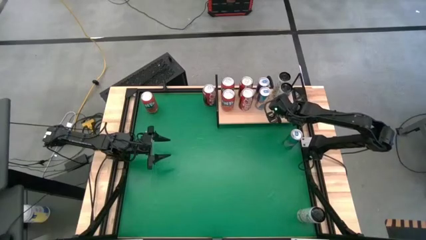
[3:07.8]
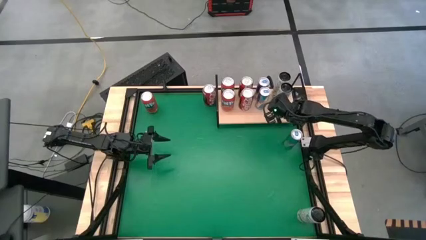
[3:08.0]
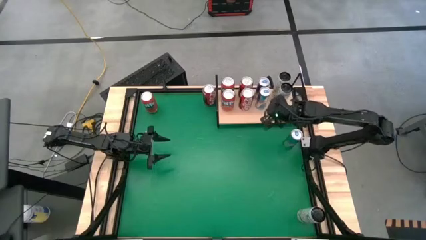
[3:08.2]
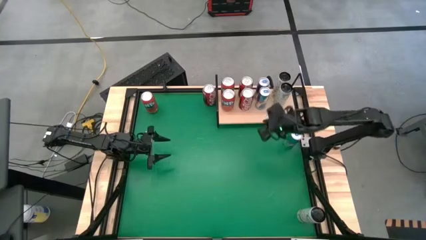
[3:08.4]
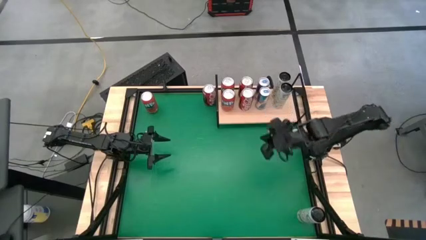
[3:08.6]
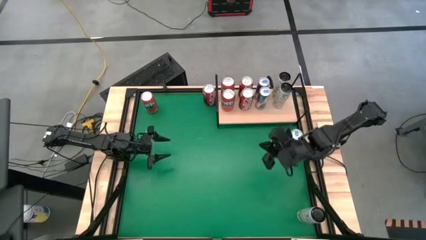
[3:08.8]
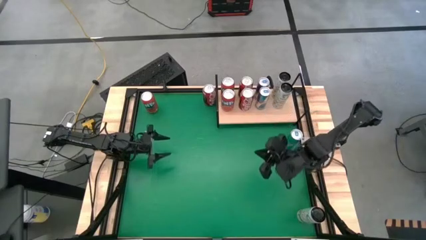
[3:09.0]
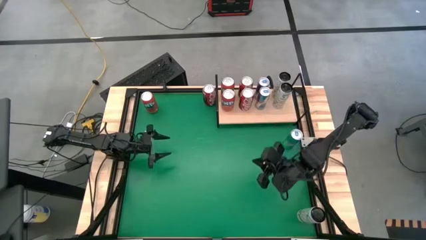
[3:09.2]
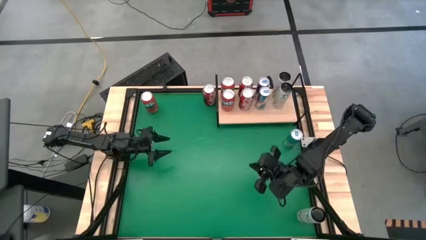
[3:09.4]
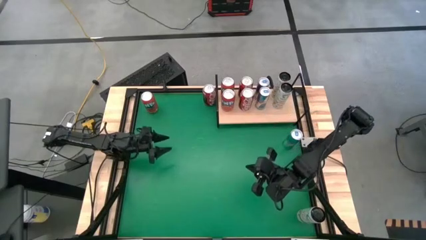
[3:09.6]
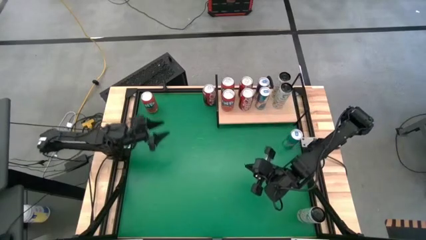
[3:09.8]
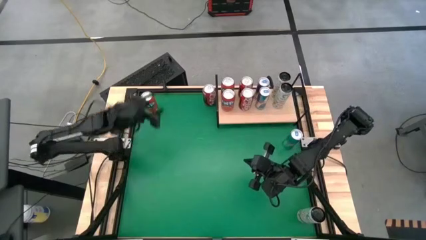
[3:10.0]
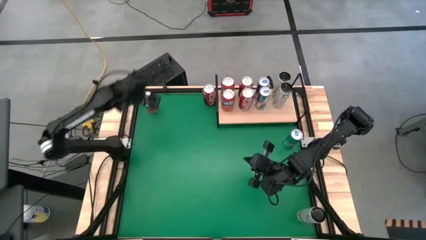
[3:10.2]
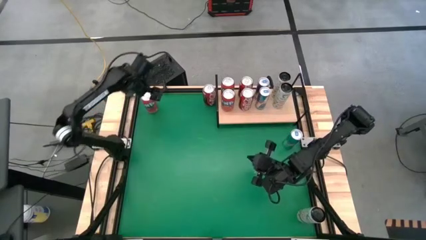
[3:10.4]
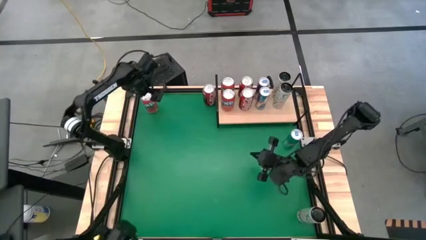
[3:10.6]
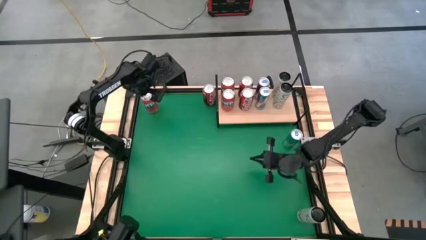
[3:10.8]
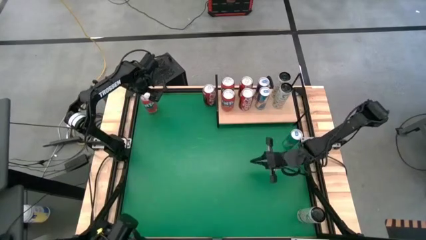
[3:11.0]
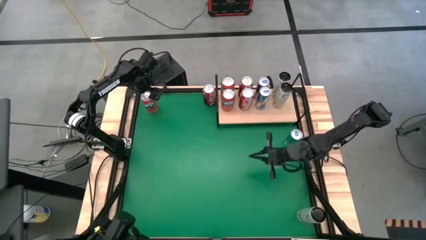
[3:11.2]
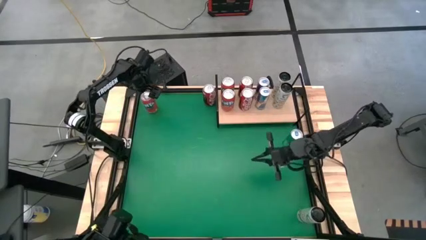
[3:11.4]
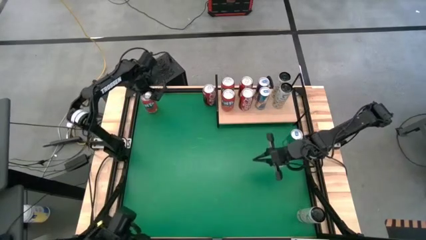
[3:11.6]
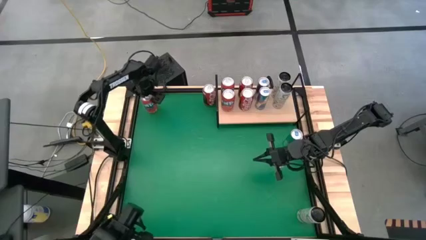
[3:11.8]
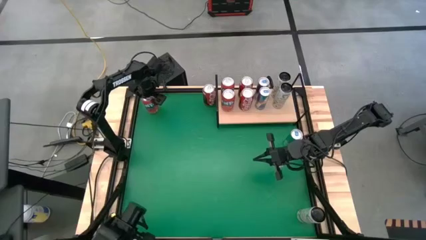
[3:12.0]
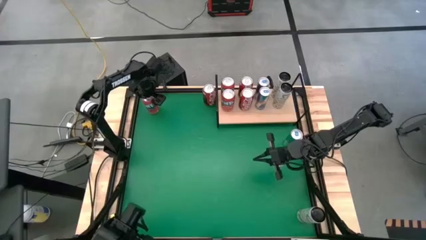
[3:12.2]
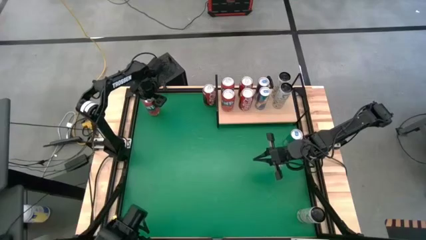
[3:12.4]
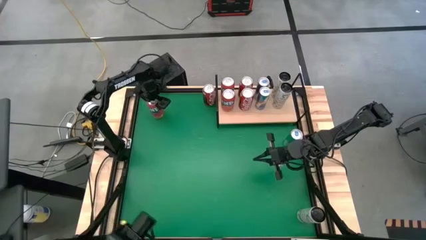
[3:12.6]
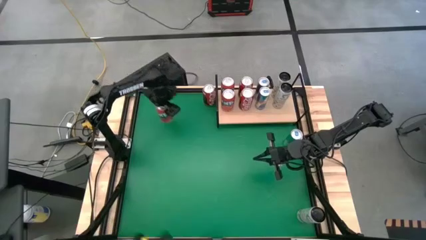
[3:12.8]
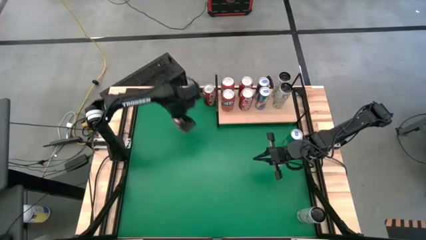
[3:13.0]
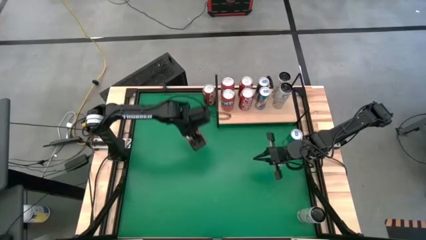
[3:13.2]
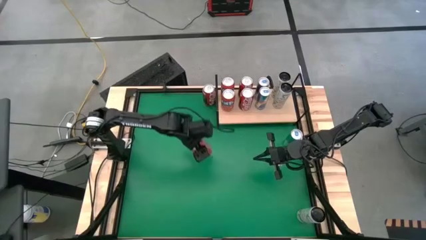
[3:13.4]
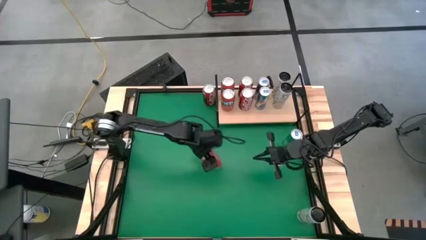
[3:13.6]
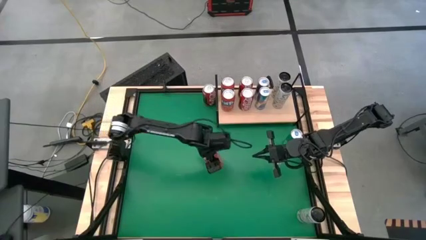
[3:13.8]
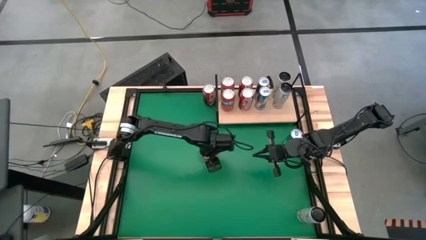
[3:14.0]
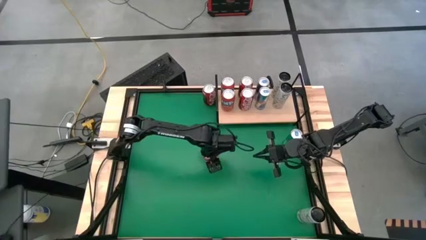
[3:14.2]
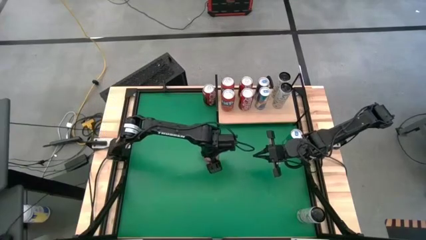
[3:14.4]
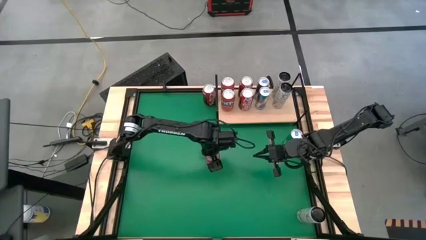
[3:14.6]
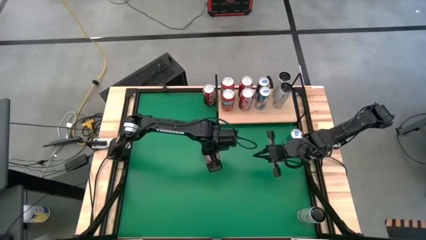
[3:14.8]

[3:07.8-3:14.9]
Task: Place canned beverage on shelf
Move the red soda can to the center of the table

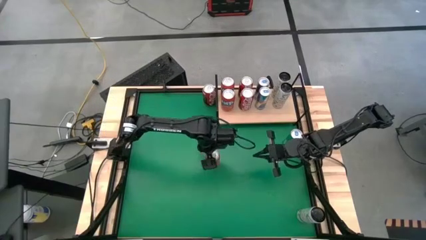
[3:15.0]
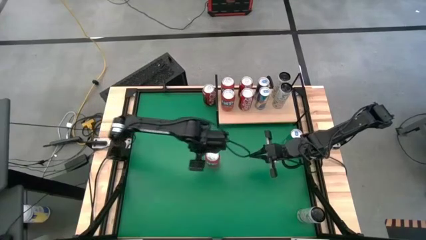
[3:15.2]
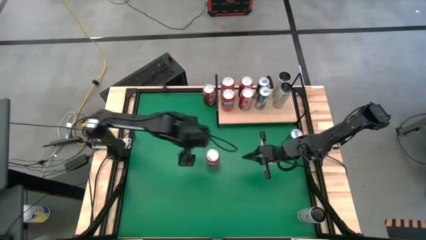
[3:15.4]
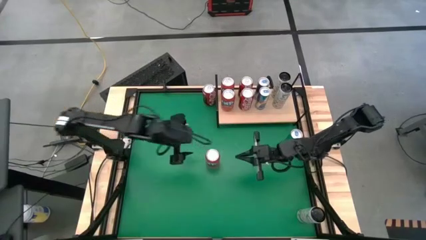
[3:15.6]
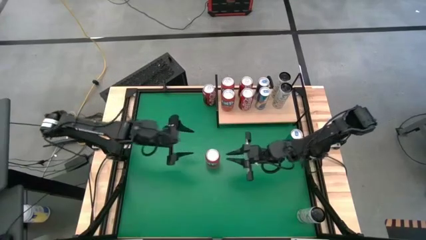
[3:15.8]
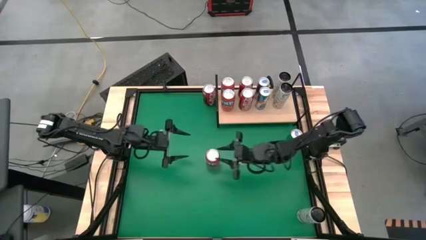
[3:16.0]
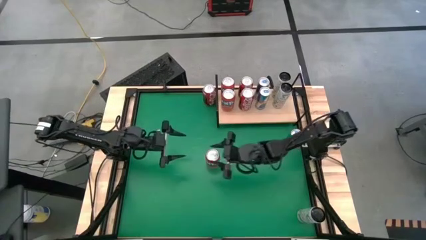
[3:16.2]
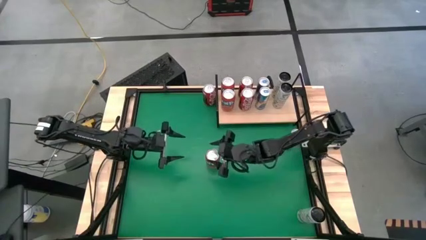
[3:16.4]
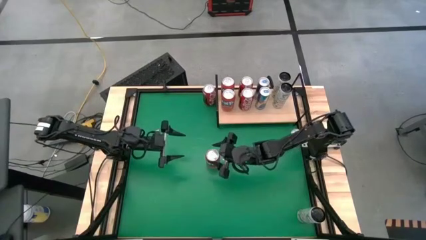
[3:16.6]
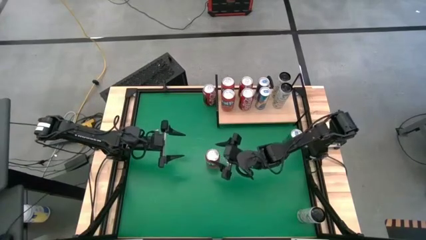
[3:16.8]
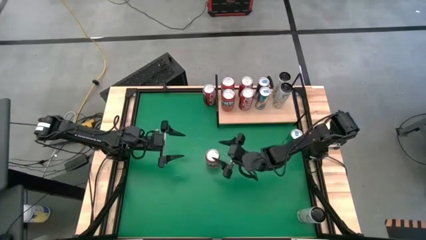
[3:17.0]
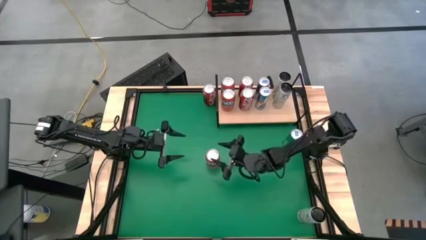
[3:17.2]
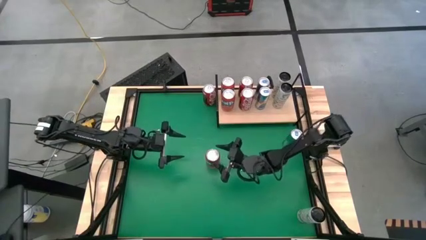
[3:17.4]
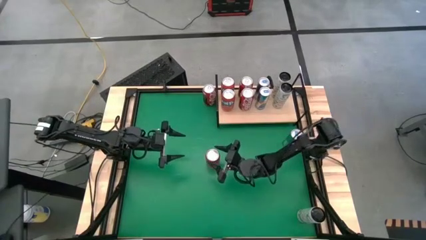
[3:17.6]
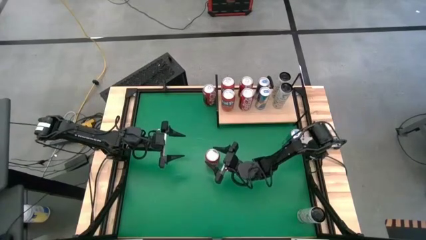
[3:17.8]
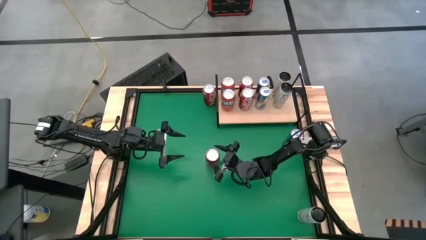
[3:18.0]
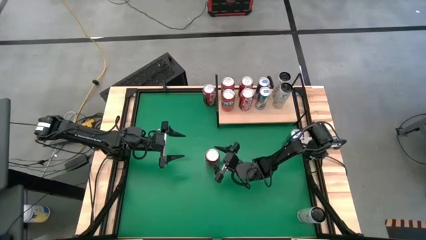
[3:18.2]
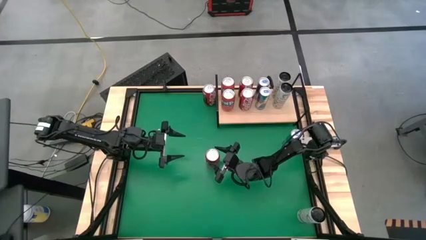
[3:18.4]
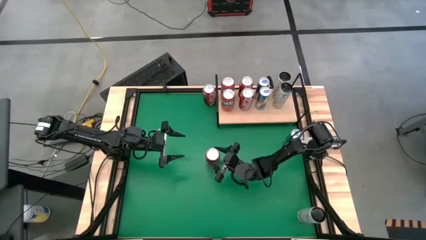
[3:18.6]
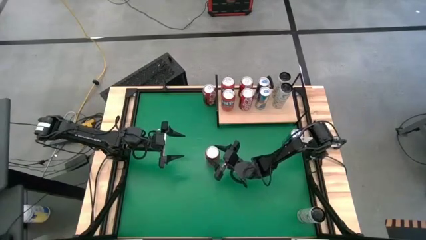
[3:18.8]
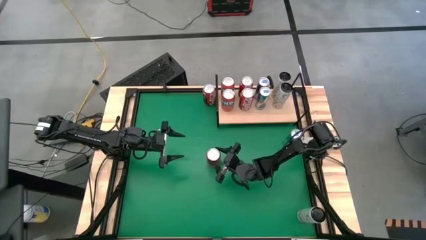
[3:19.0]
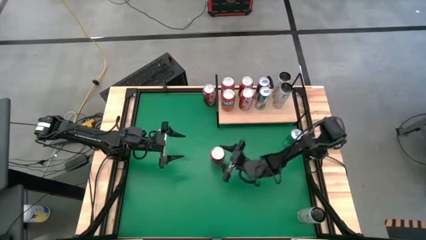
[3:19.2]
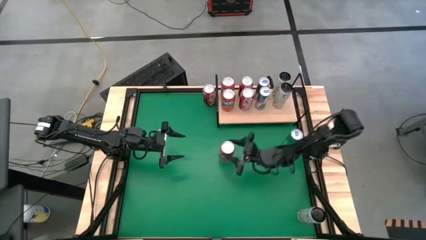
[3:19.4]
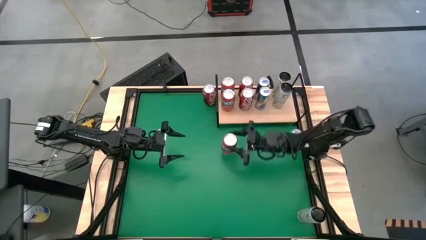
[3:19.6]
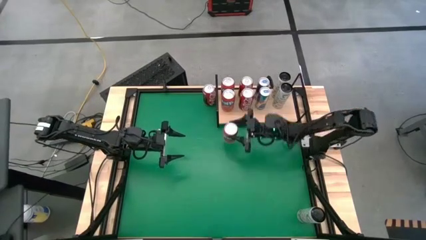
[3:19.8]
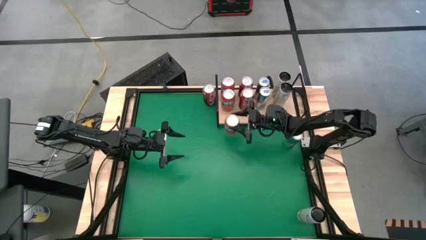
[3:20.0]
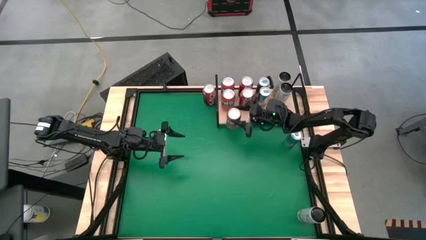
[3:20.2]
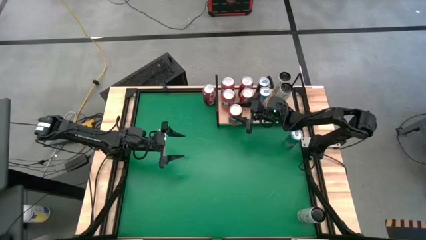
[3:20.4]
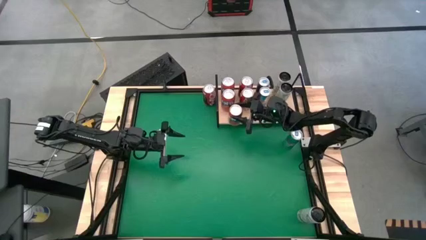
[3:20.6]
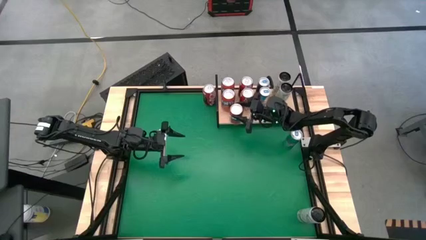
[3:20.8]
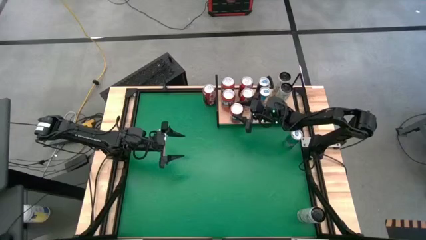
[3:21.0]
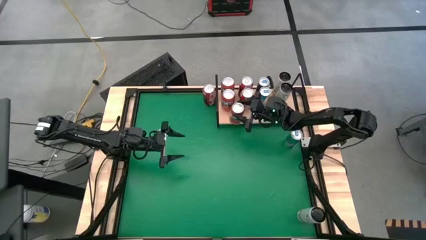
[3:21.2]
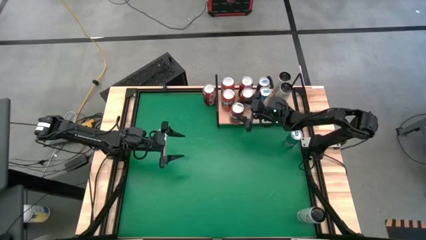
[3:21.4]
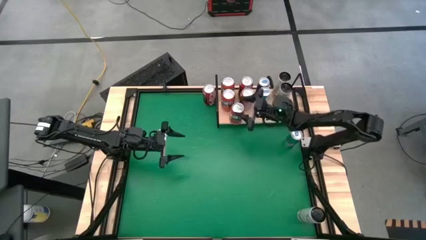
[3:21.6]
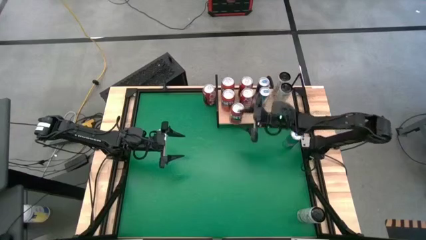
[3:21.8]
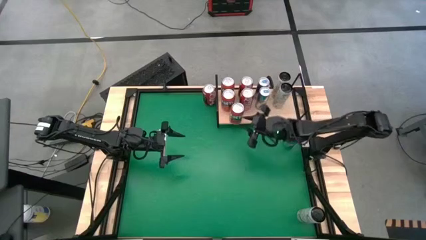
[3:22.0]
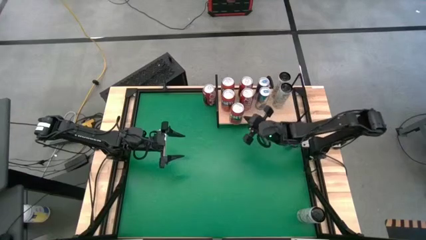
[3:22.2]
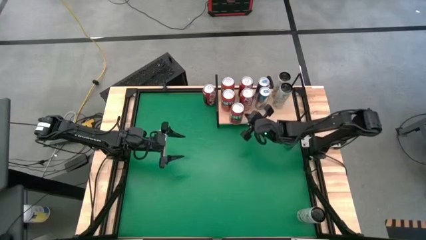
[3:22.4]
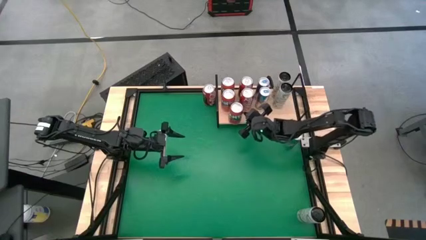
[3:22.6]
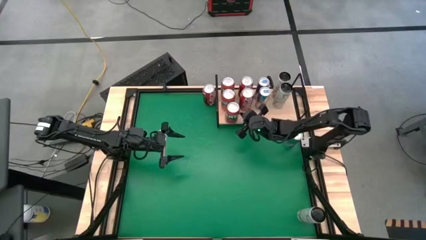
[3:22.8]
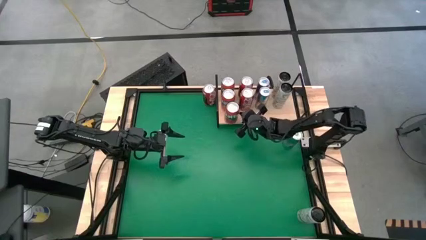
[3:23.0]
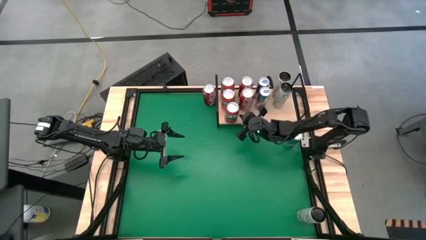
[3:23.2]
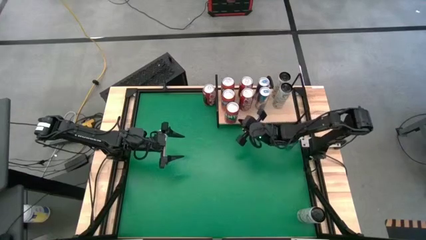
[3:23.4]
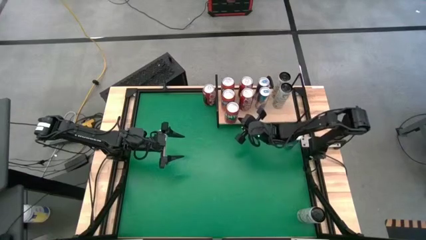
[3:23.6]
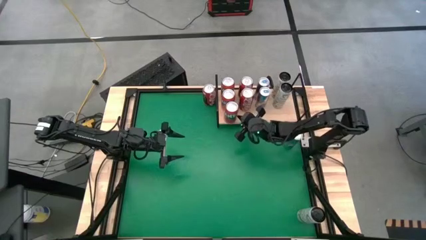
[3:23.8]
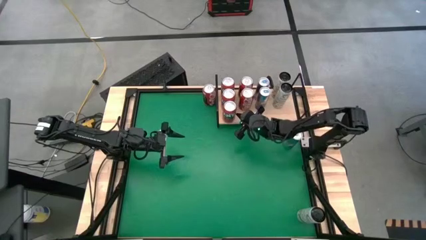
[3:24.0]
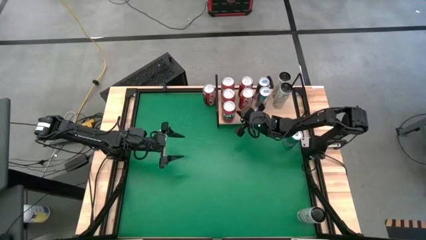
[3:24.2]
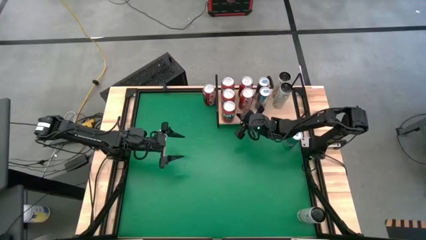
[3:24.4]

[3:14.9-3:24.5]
Put the red soda can on the shelf aligned with the other red soda cans
